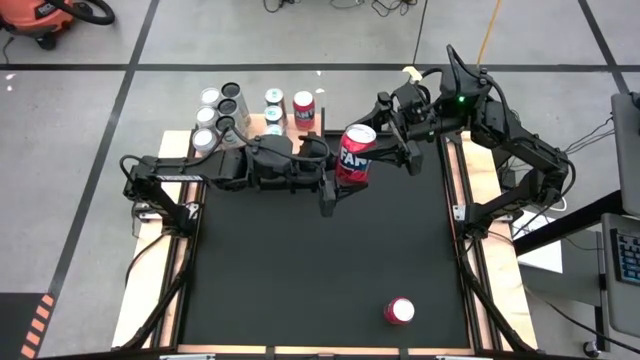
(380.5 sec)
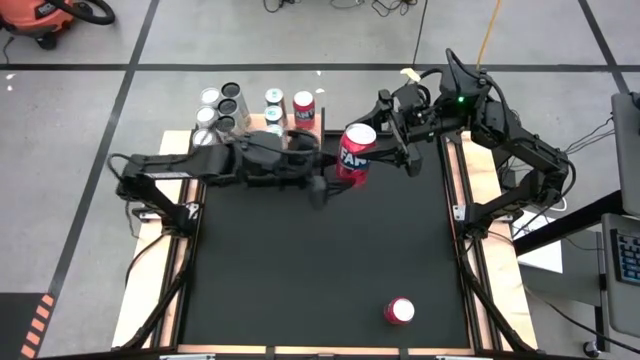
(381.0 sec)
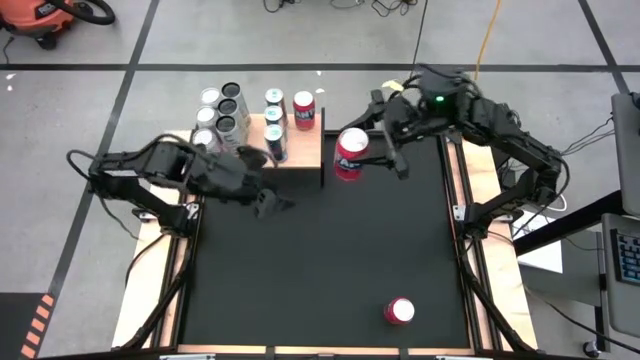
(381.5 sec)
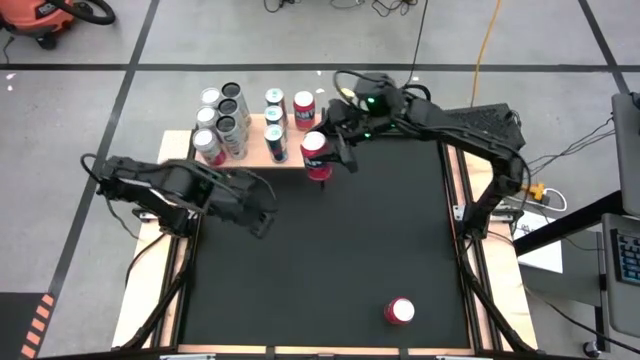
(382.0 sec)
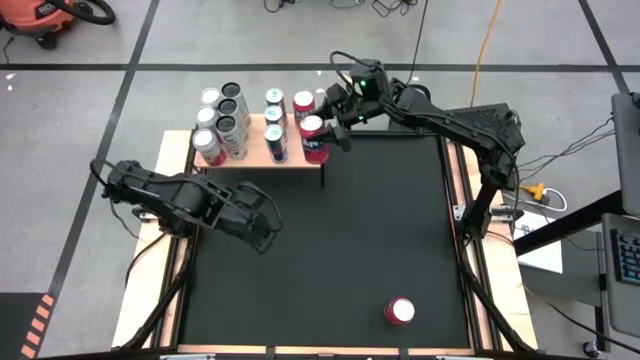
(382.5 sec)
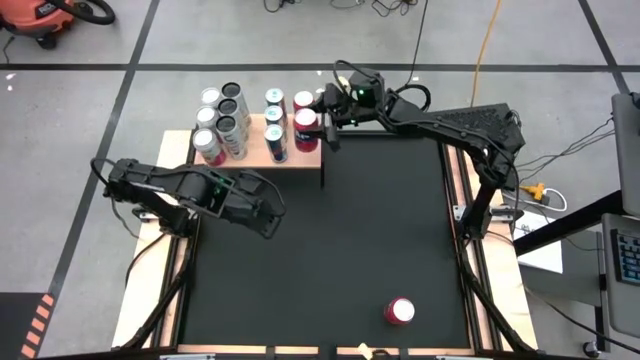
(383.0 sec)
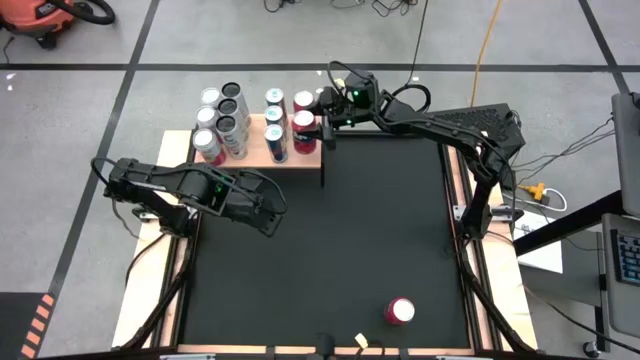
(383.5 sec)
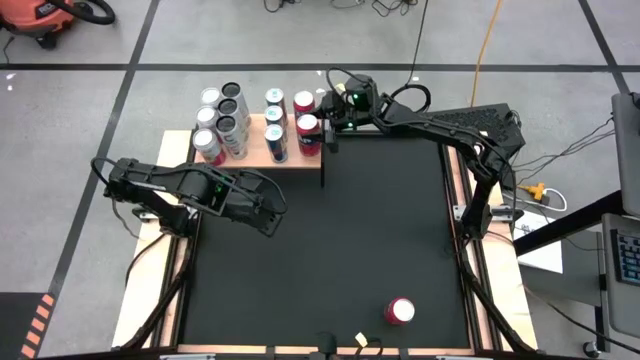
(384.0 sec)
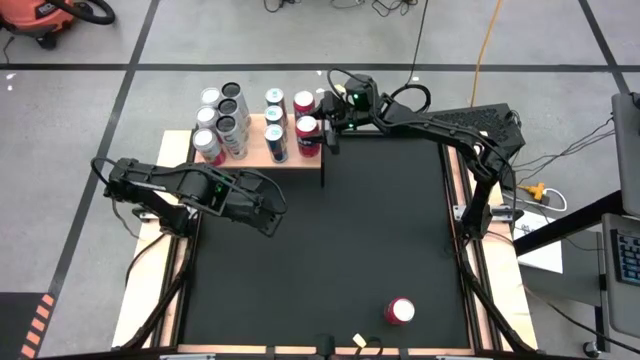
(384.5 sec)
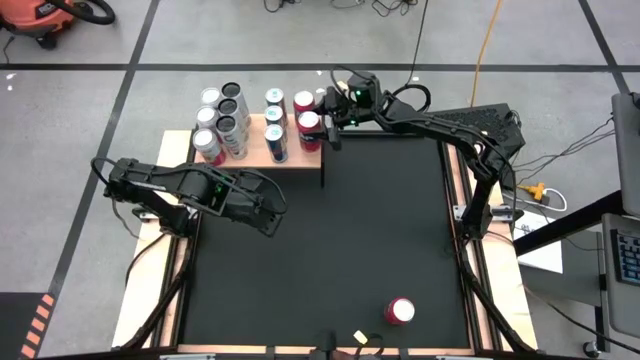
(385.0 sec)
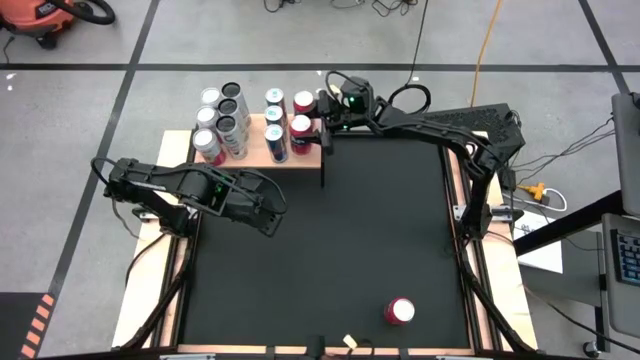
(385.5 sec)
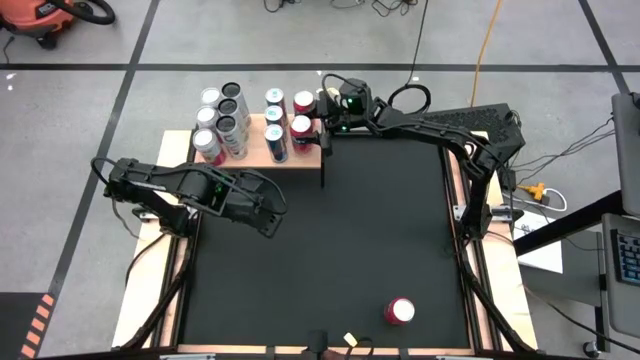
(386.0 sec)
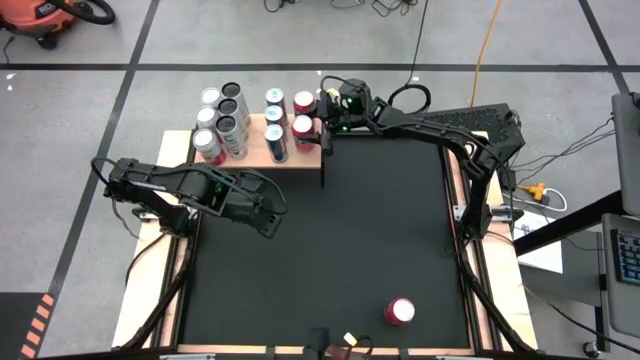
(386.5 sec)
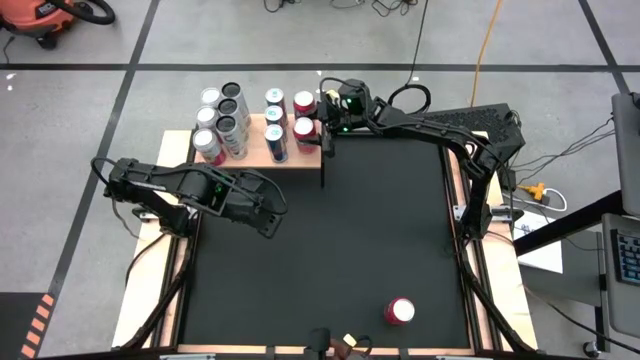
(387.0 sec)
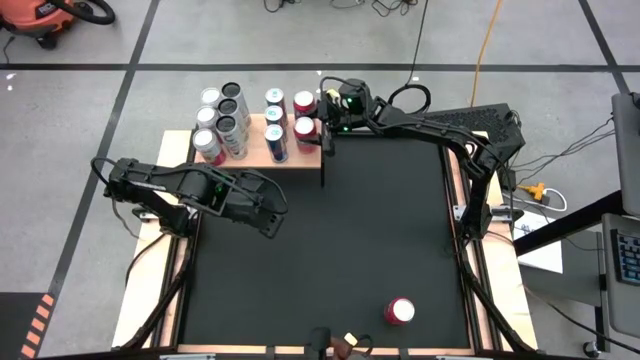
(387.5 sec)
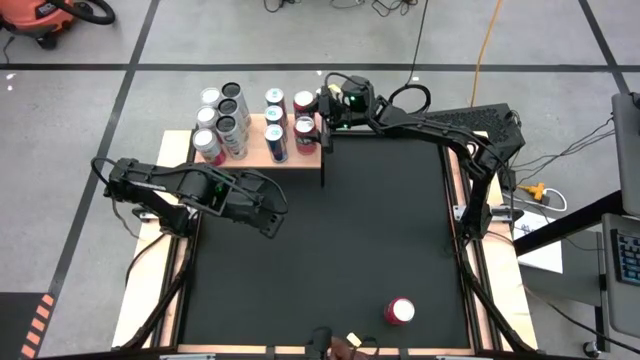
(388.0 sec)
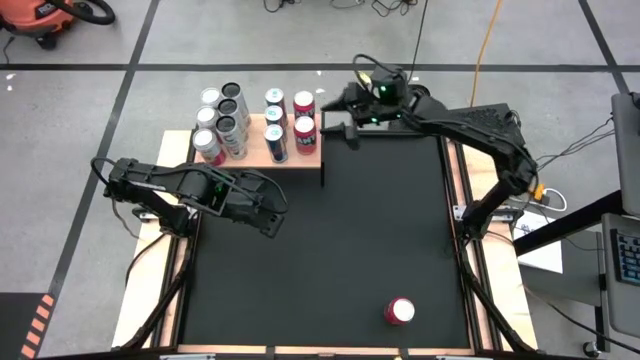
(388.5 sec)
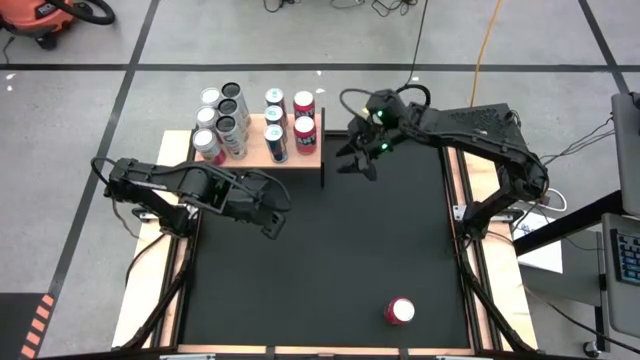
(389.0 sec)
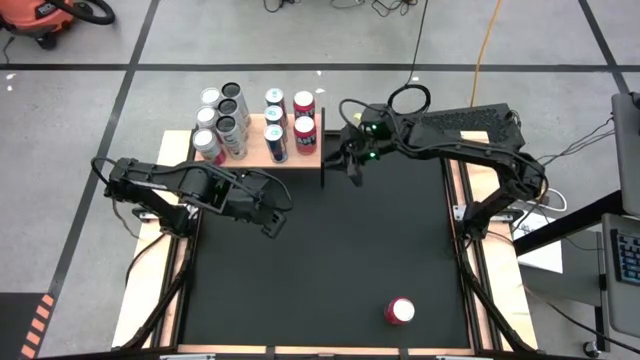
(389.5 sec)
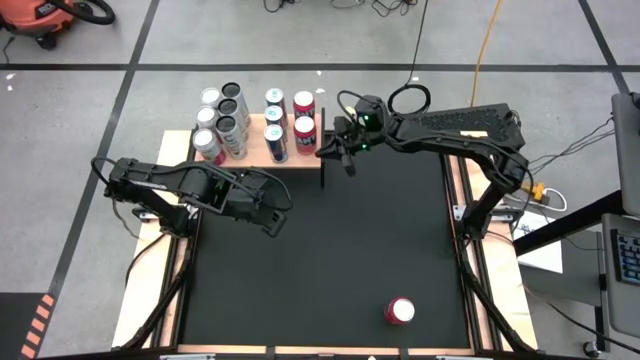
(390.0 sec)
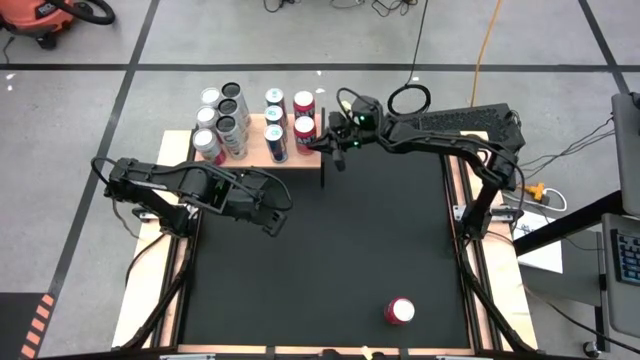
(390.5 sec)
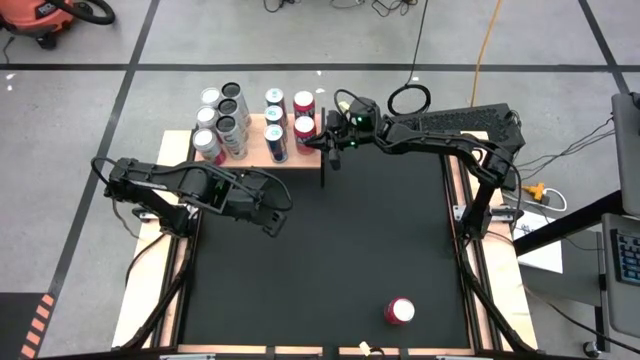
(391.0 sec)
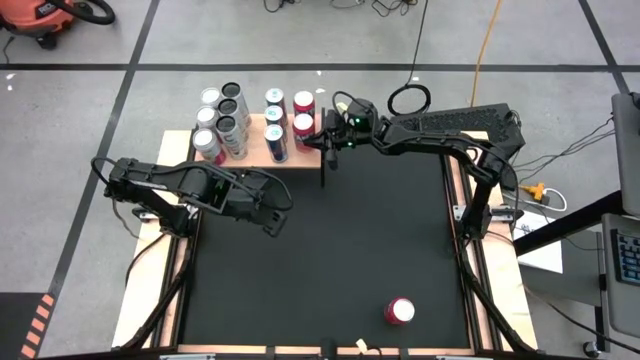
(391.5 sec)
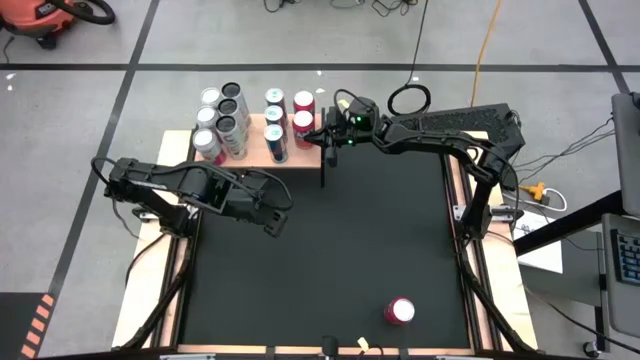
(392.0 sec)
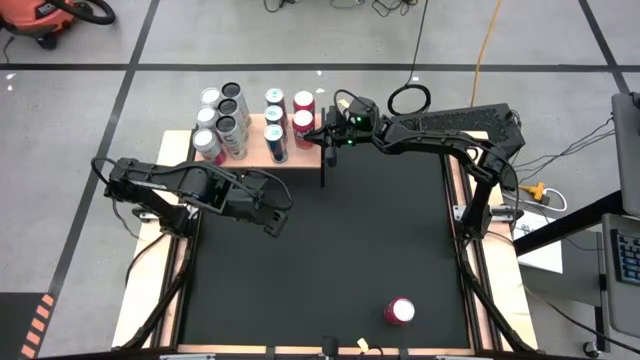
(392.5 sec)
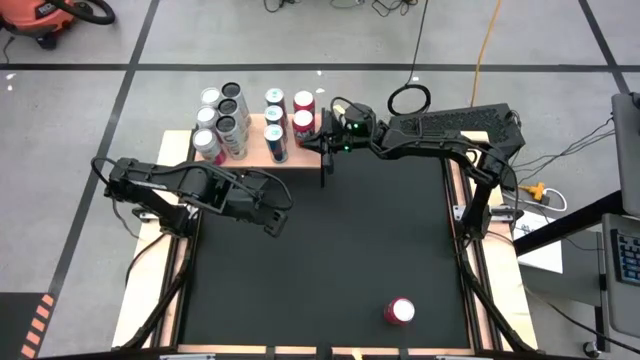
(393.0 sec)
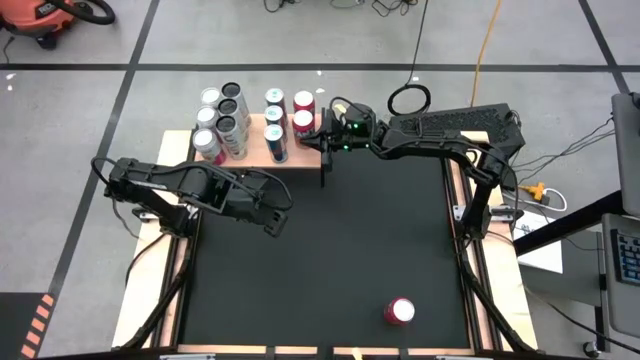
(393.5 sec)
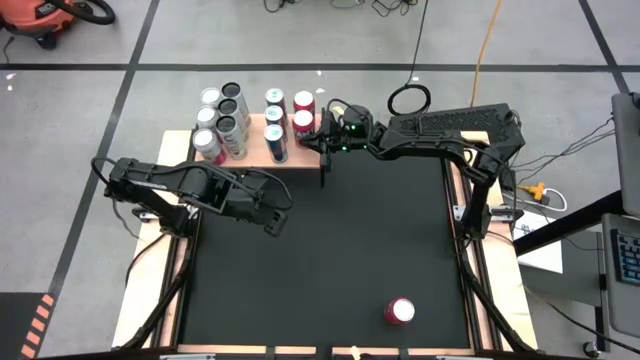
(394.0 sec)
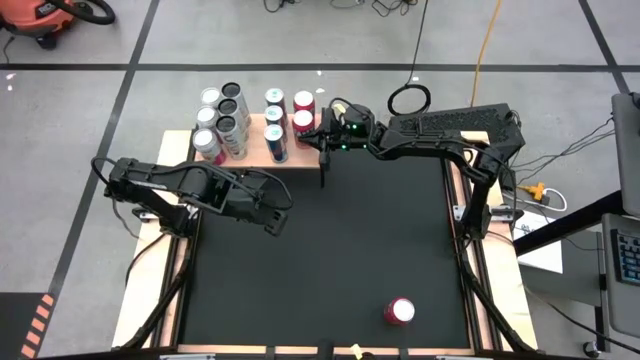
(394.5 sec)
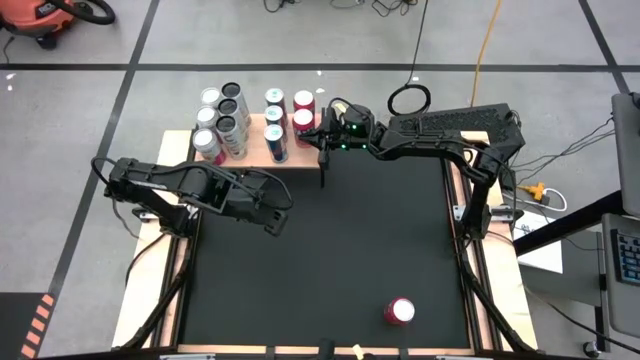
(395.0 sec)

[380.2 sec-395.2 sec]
Task: Place canned beverage on shelf
Put the top red soda can on the shelf aligned with the other red soda can

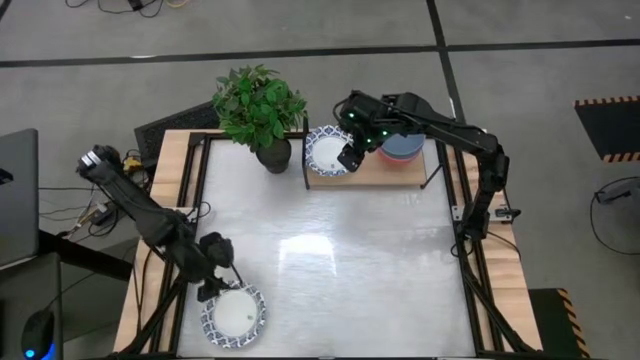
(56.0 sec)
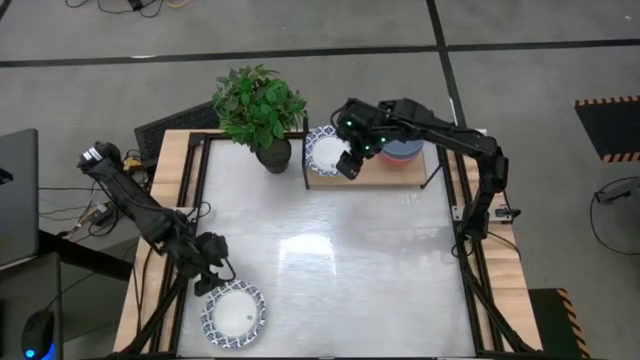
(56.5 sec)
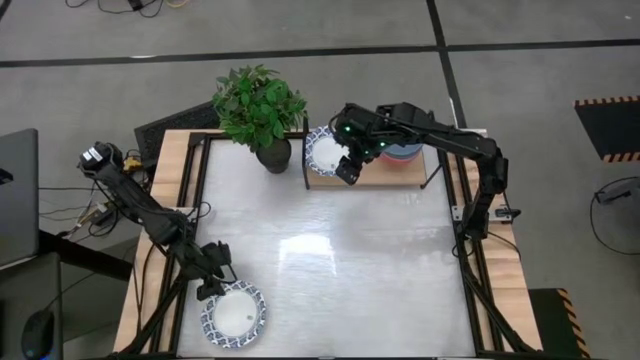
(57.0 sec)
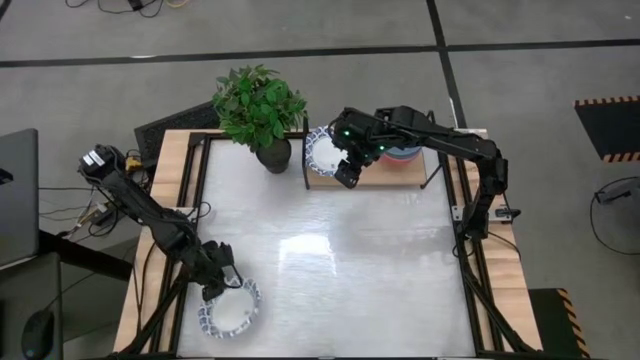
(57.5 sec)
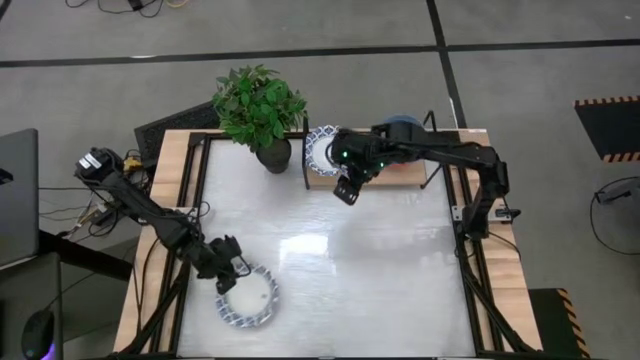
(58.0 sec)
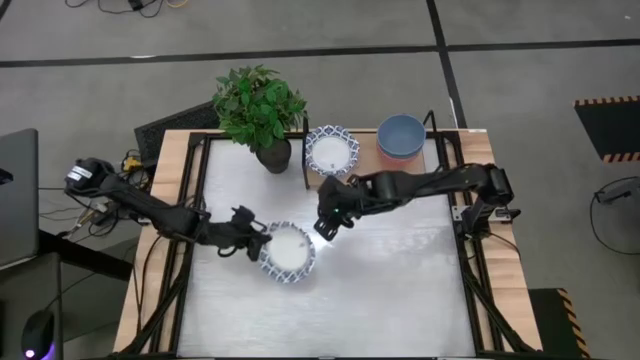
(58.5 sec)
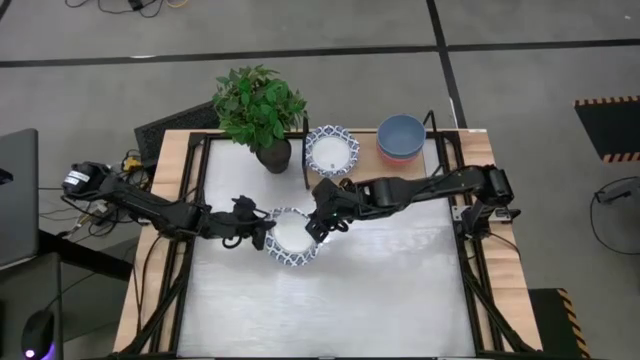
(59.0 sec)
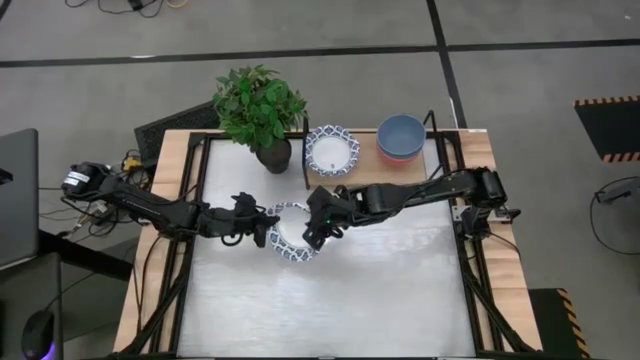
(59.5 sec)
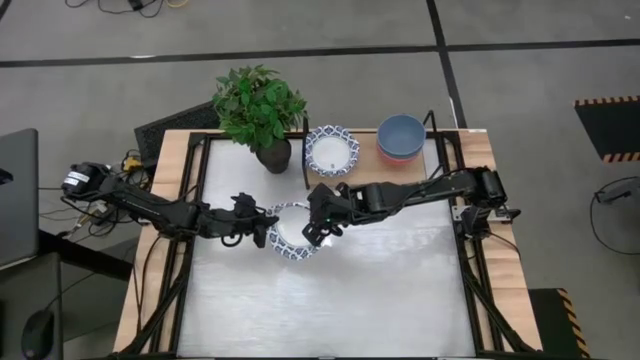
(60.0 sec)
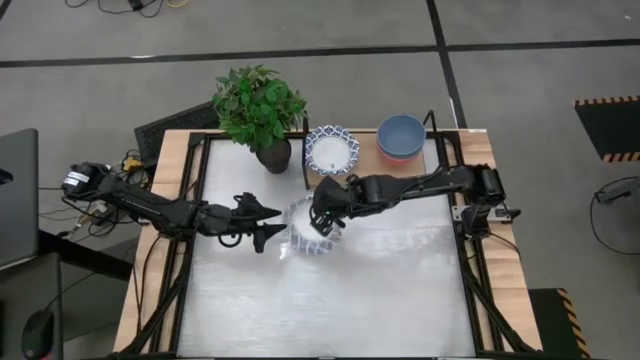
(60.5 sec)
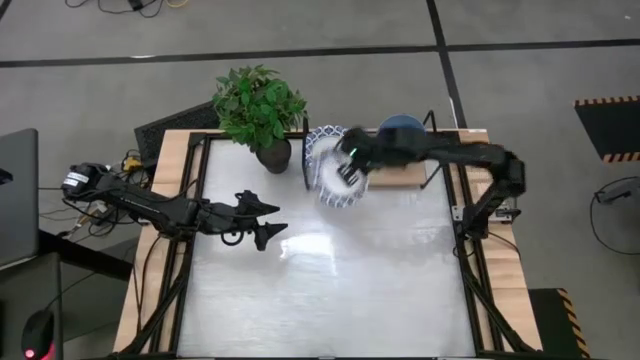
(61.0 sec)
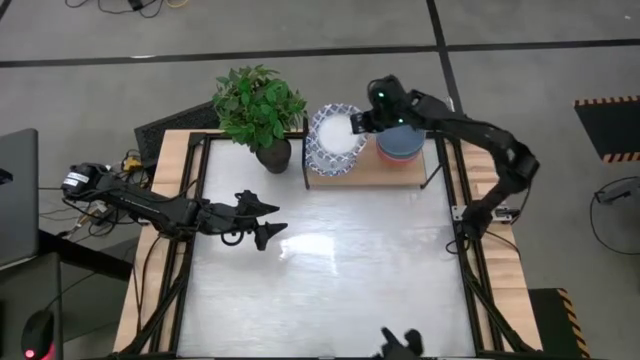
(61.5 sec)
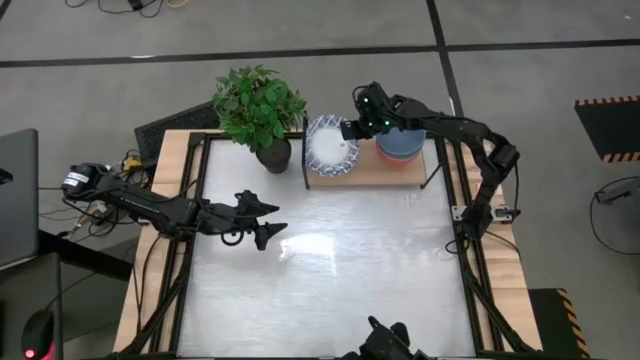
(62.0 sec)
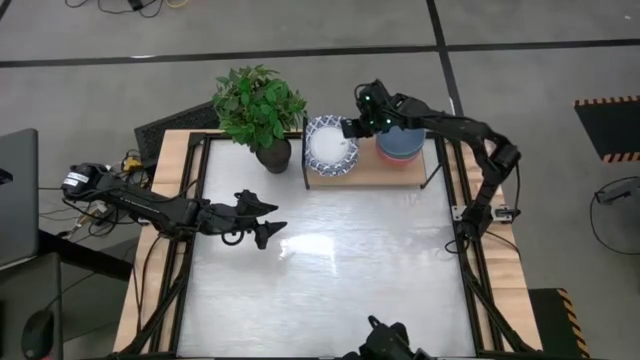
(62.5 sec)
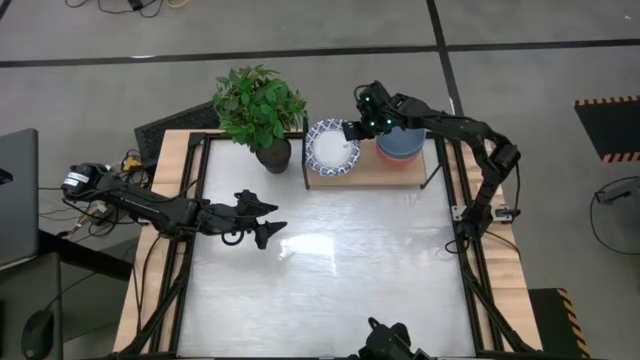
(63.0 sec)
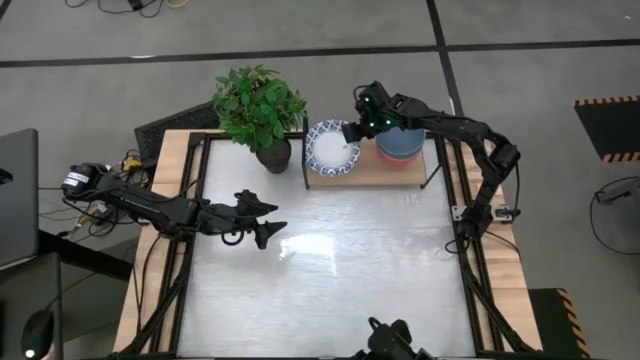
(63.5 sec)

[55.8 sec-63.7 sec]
Task: Place and stack bowls onto a shelf
Stack the white bowl on top of white bowl on the shelf
